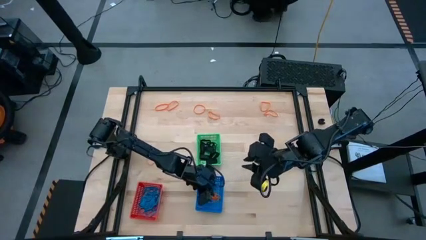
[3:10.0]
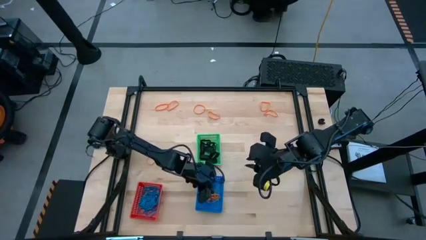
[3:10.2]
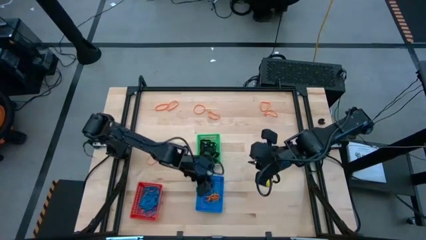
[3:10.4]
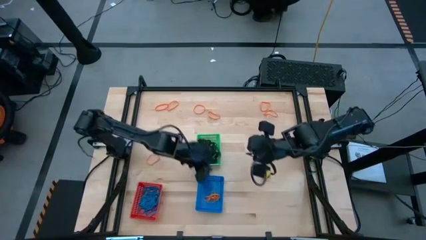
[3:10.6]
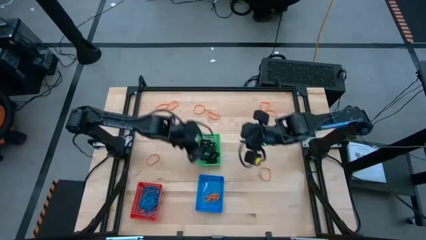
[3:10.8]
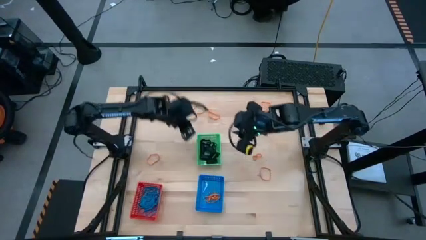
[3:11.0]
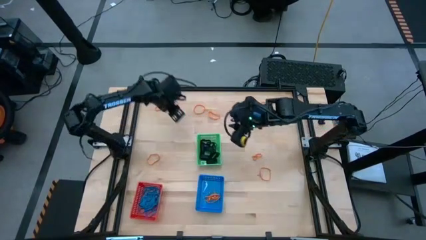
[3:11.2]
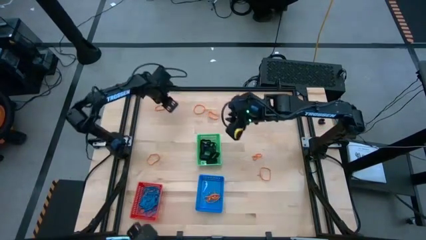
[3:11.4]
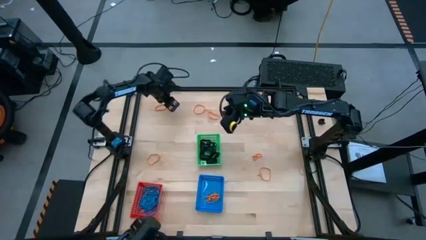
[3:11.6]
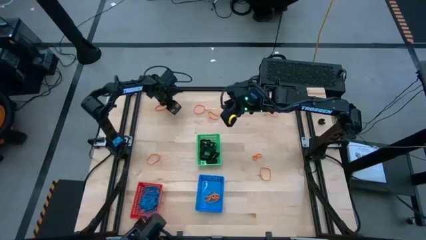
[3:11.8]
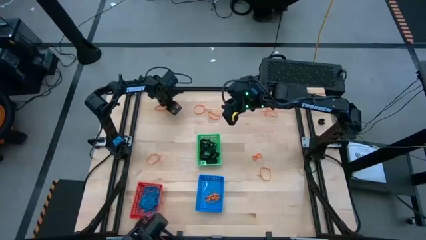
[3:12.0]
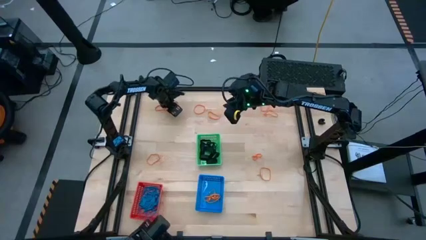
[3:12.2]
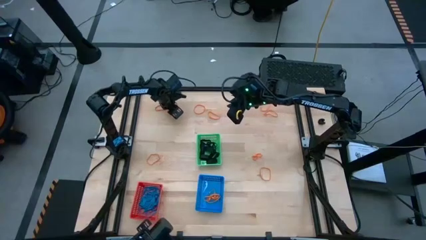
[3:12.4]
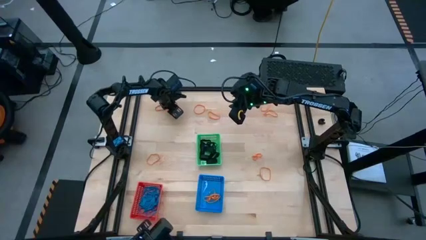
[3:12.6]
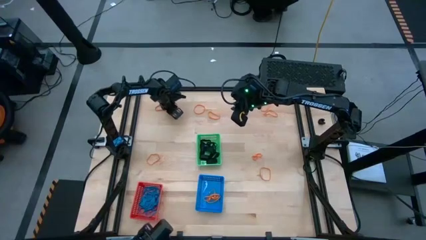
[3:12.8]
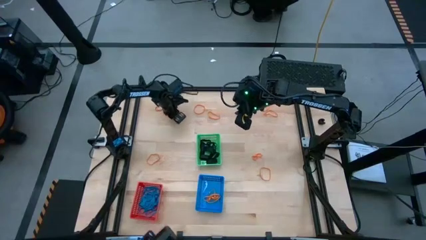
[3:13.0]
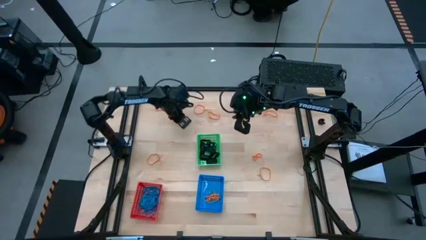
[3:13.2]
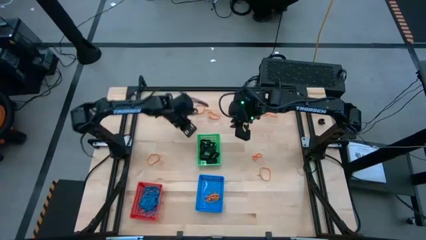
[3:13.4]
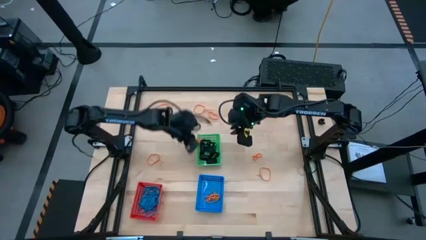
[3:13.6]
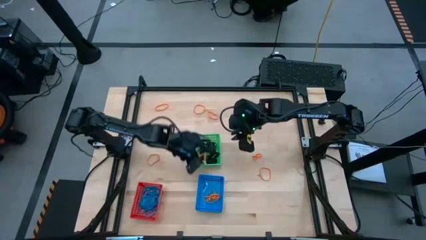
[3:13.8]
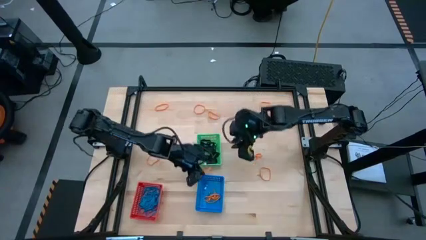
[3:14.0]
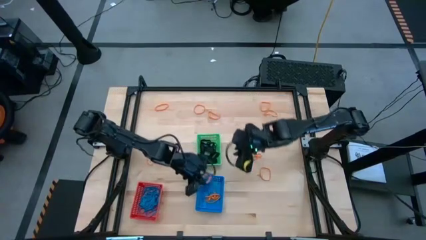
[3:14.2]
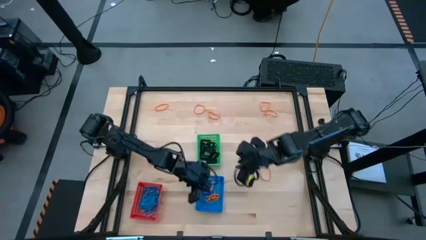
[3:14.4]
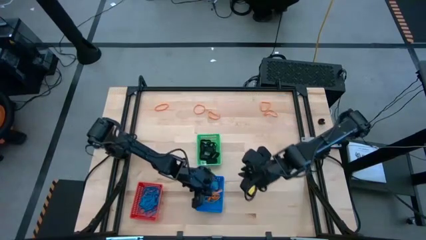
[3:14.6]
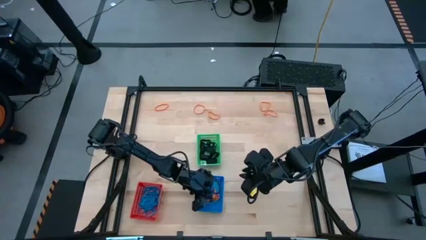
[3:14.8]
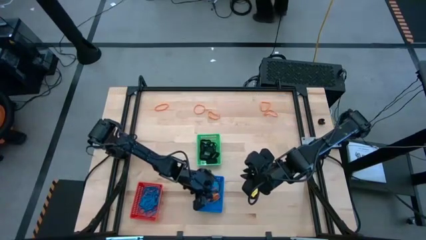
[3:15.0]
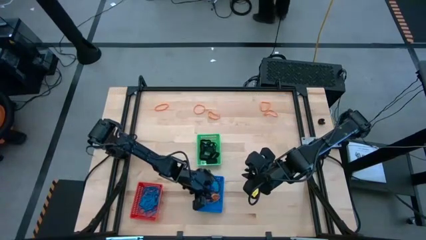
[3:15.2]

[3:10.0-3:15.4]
Task: Sort rubber bands into baskets
Put the orange rubberband into the blue bin

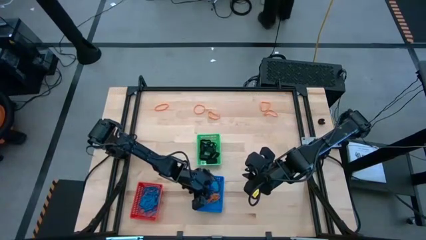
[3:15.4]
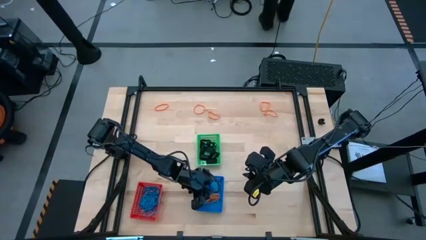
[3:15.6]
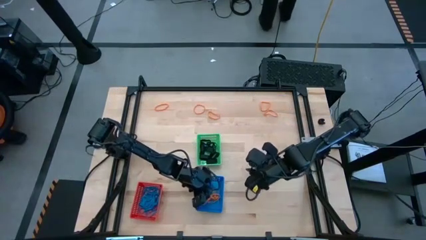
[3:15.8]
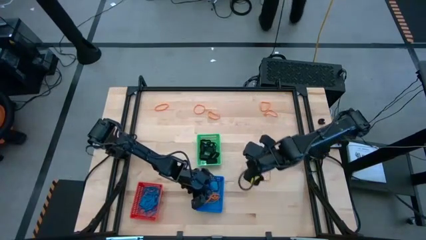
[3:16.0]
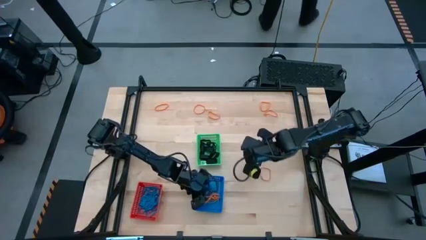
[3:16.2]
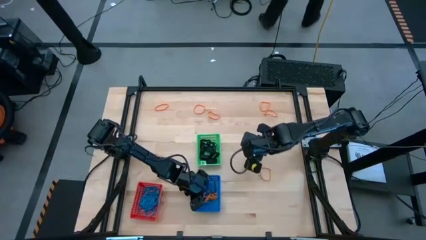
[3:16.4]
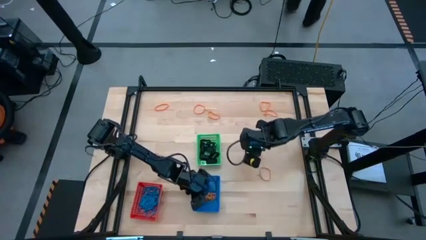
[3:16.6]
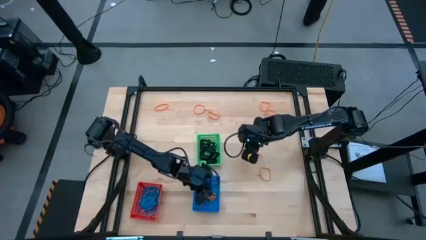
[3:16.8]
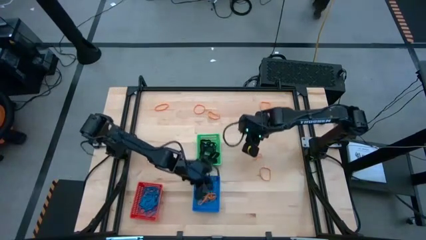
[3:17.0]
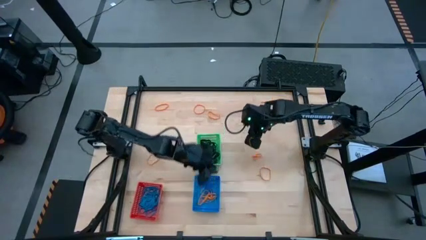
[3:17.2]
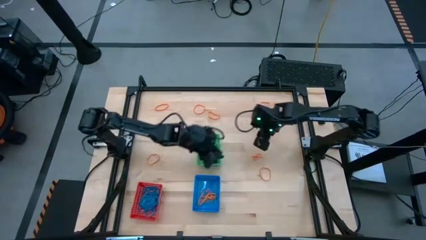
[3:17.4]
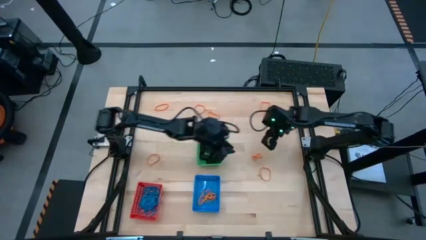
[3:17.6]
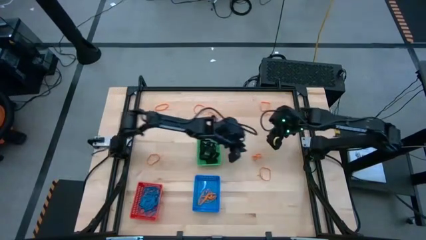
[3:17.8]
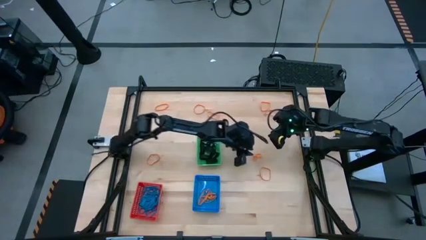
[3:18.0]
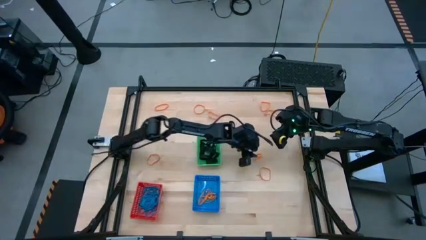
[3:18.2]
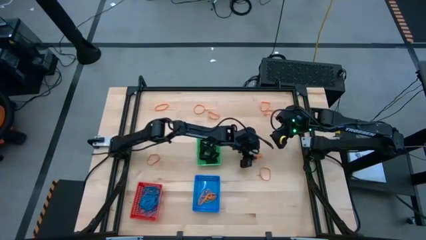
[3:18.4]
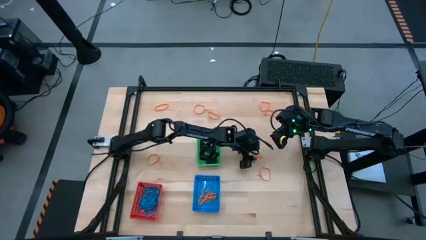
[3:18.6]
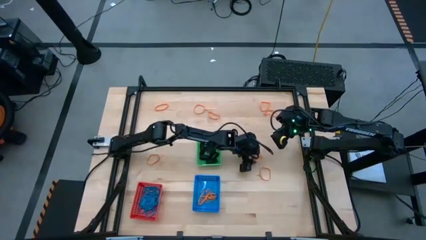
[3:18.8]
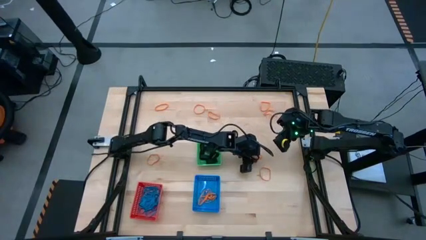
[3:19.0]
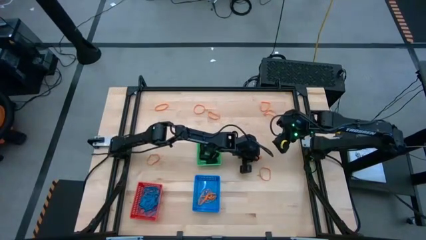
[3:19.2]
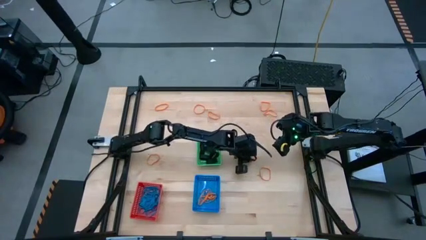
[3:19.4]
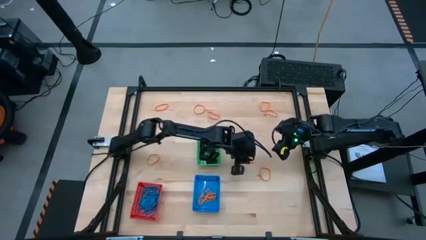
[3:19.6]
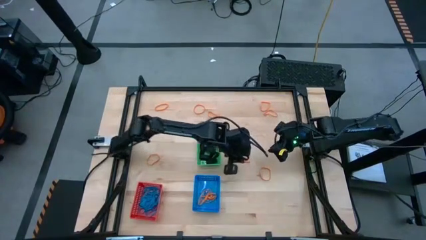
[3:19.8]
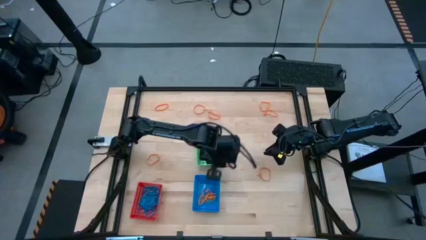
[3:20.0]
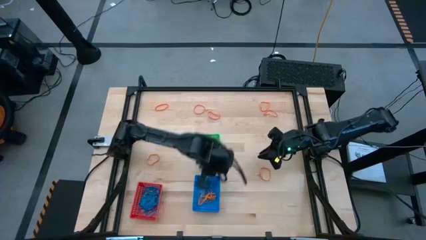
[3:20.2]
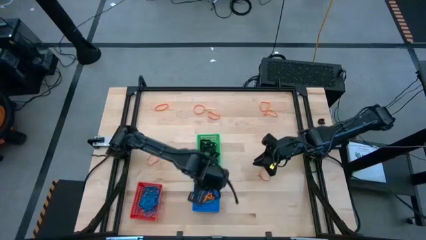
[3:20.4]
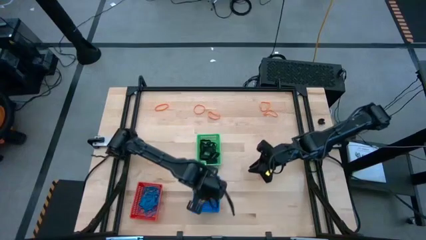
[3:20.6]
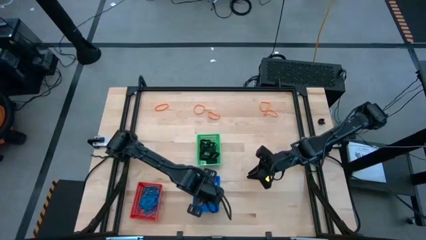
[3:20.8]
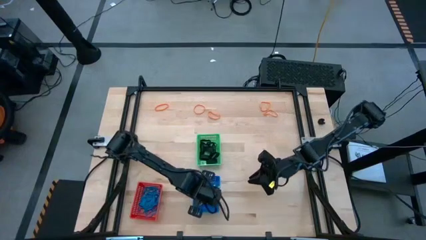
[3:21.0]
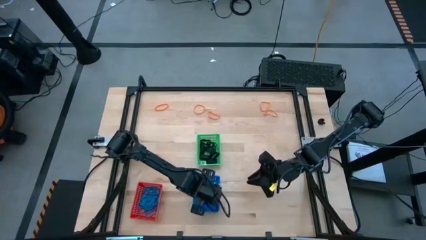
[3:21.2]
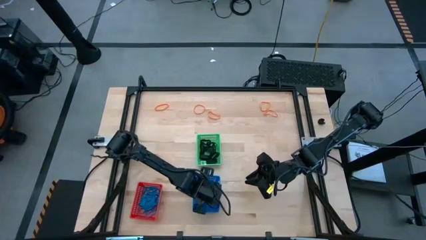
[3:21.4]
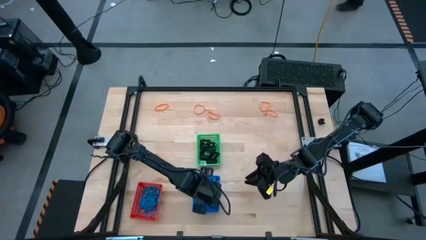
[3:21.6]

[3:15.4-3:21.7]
Put the orange rubberband into the blue bin

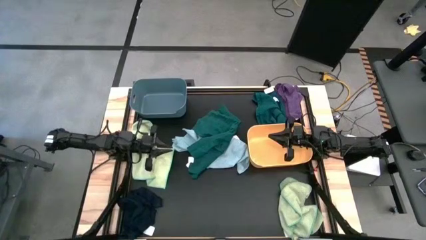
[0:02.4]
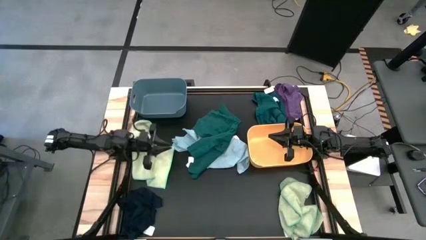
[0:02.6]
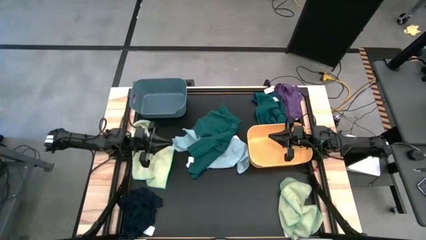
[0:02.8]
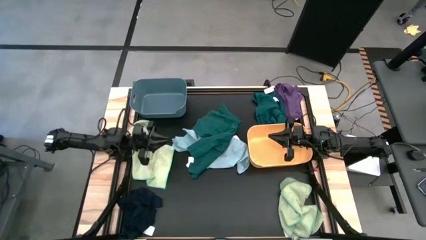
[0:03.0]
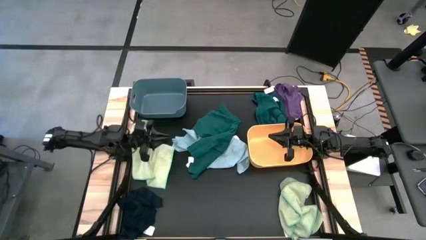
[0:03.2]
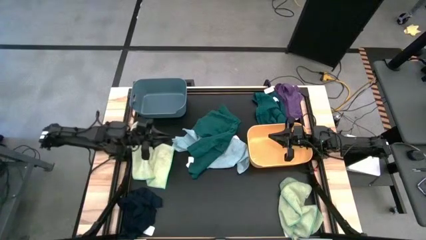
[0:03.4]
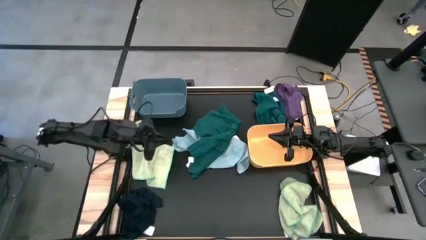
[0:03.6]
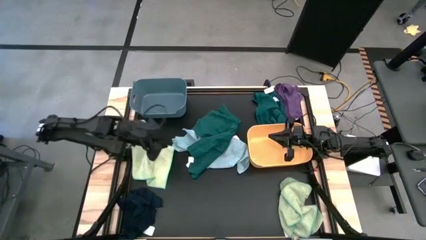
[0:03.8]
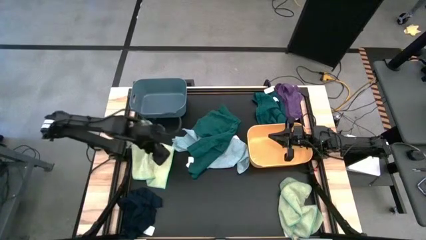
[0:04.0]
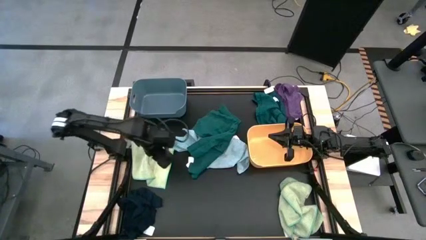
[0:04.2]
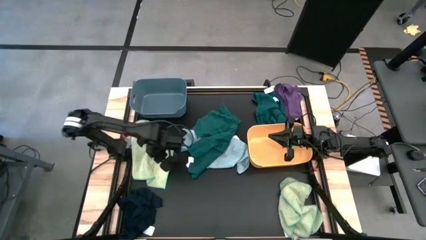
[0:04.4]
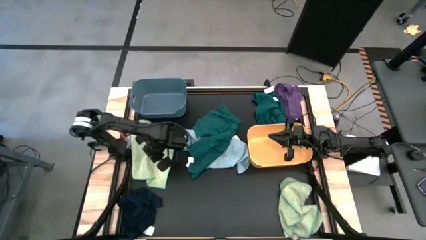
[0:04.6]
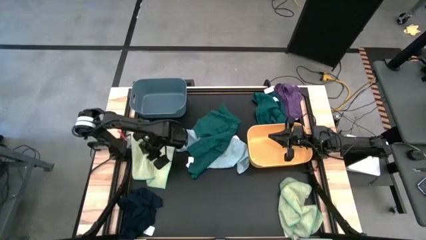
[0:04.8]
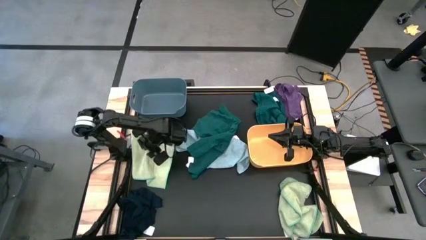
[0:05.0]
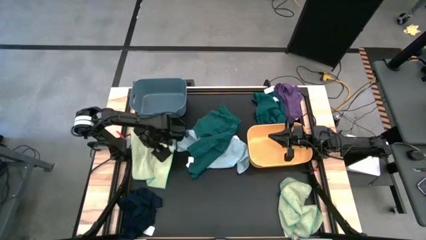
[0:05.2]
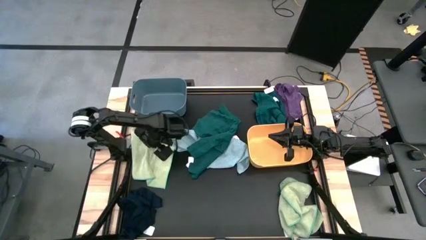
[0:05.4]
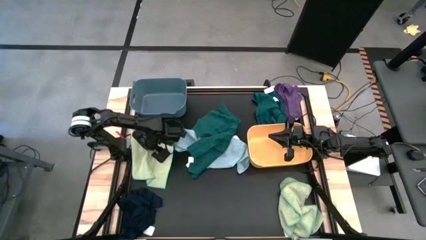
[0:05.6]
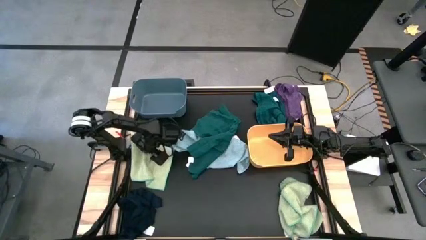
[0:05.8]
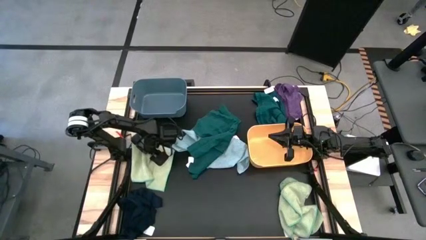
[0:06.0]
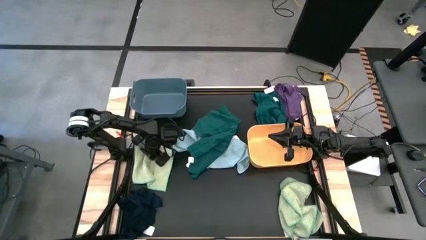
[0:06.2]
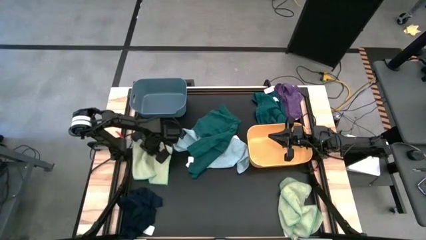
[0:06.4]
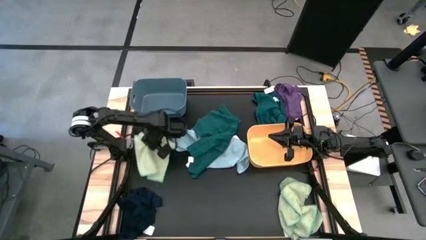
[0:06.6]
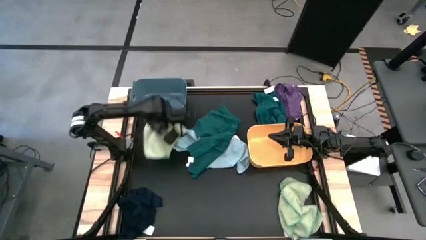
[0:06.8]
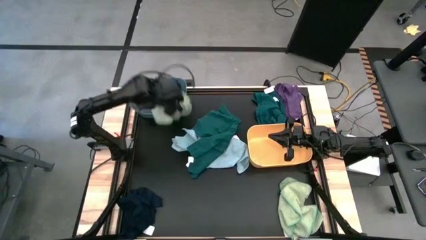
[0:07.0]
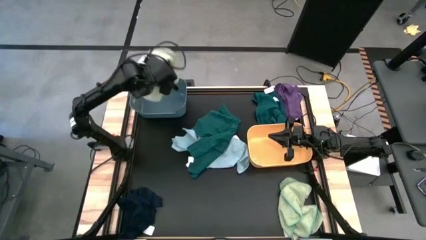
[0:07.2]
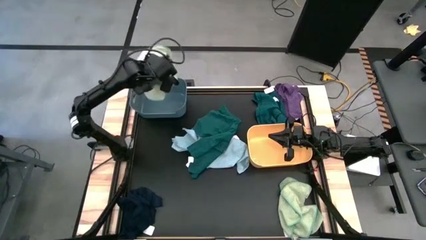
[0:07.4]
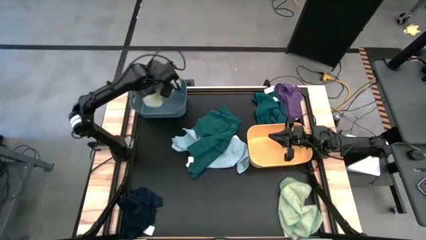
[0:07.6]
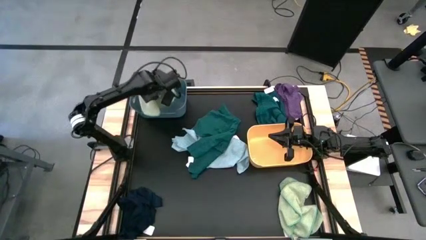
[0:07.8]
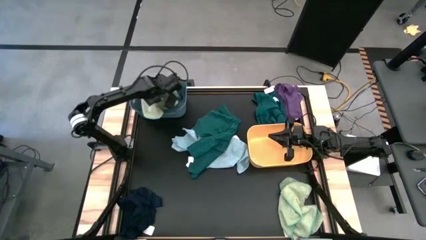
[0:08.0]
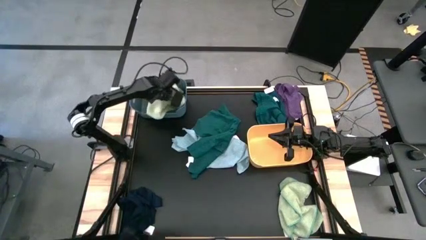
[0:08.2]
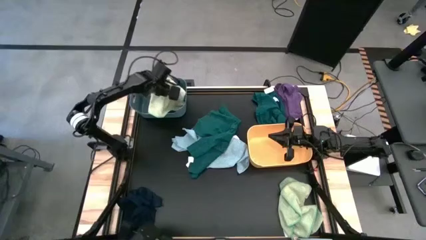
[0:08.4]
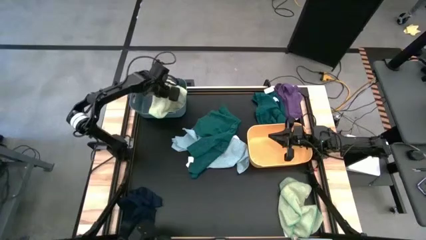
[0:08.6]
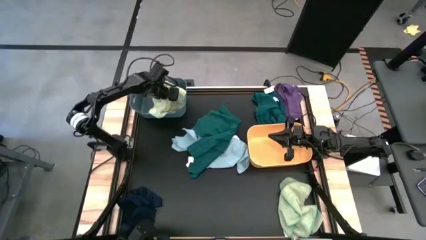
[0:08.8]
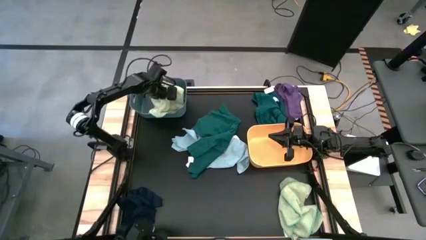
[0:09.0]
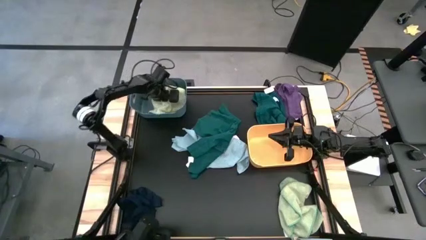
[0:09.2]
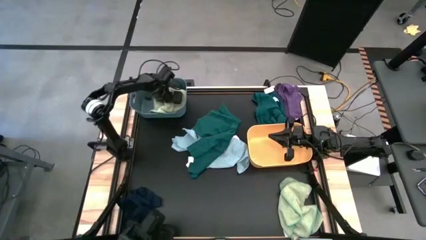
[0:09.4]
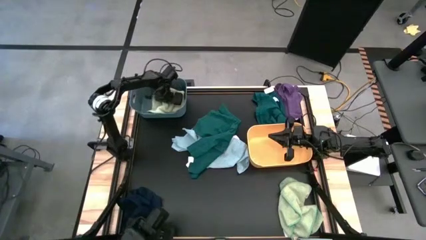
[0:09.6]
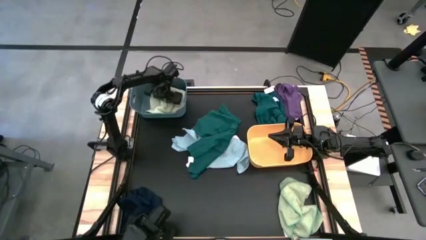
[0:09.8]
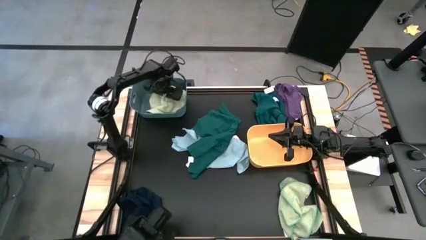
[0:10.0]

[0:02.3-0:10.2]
Task: Sort towels by color in basket
Put the left khaki towel into the blue bin
